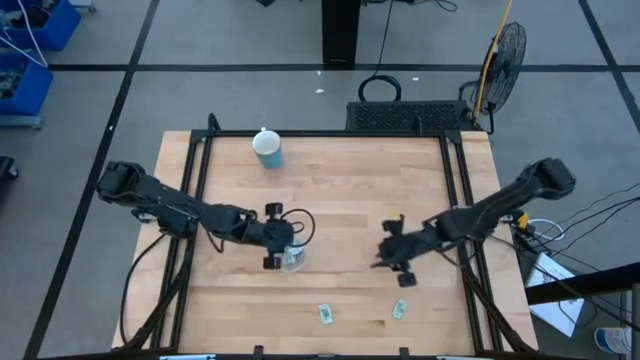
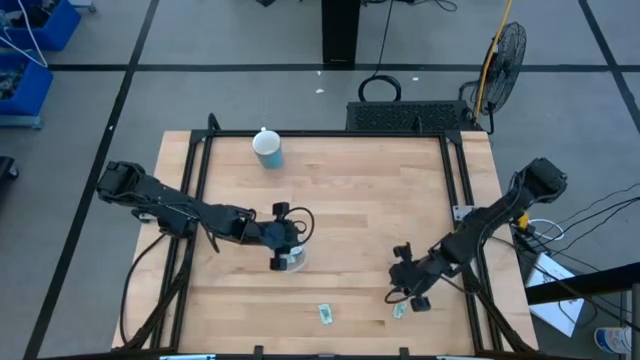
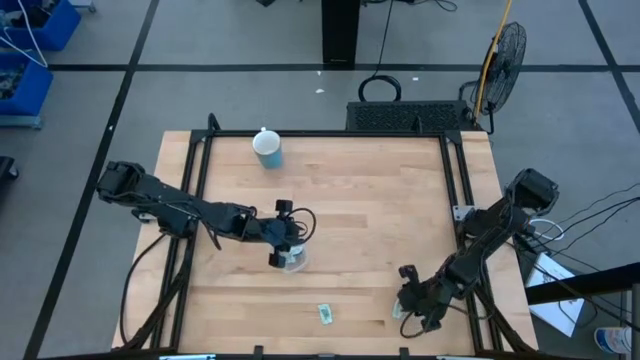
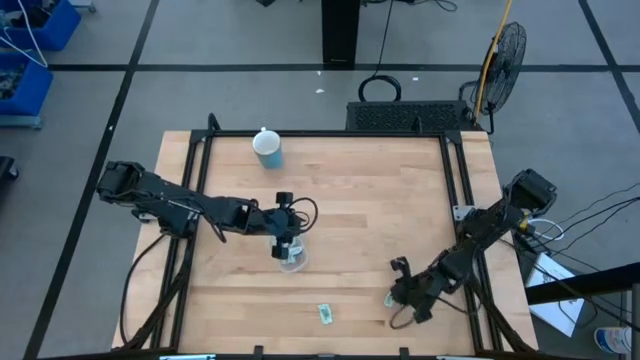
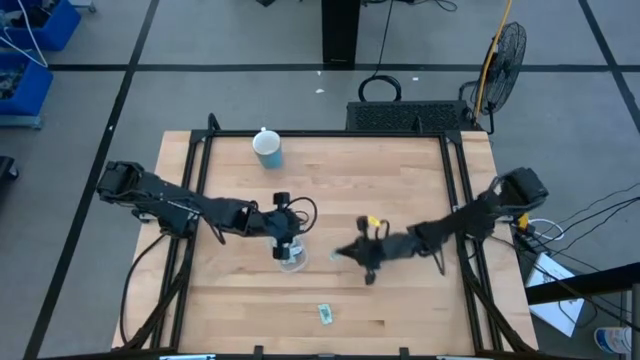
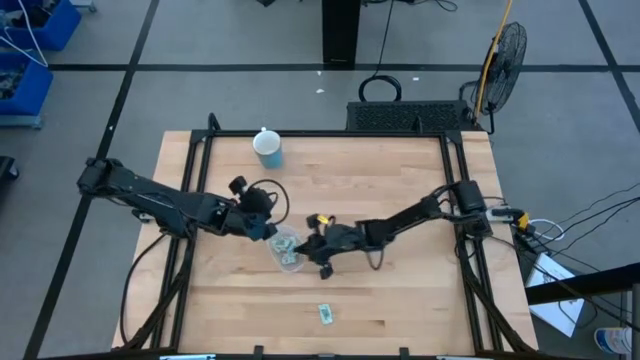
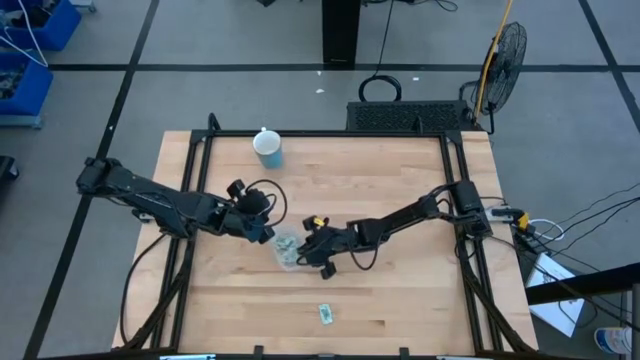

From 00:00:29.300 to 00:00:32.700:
Task: Pick and place Stevia / Truvia into bins
Put the stevia packet into the transparent container

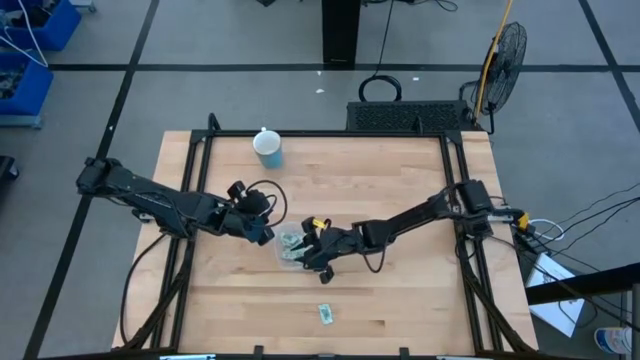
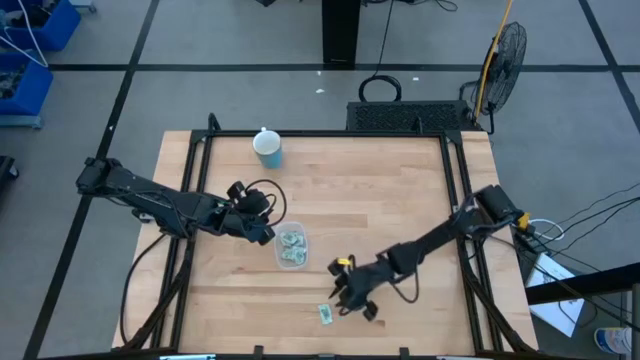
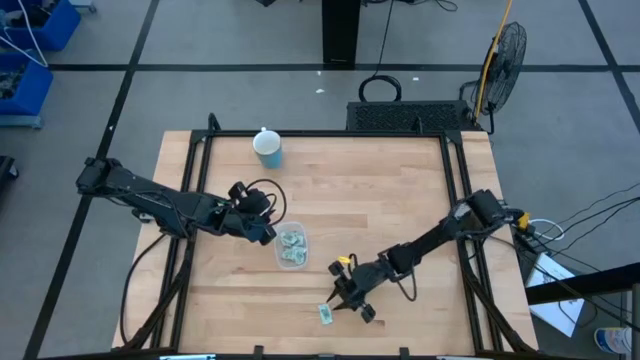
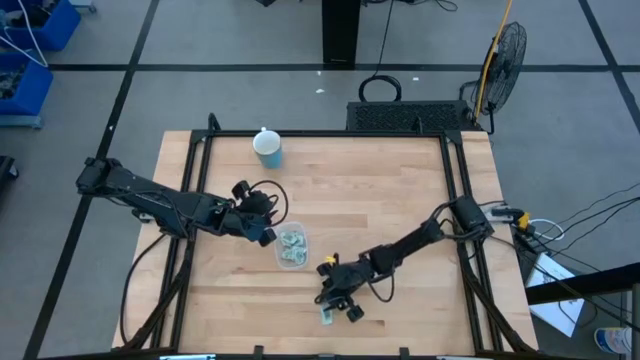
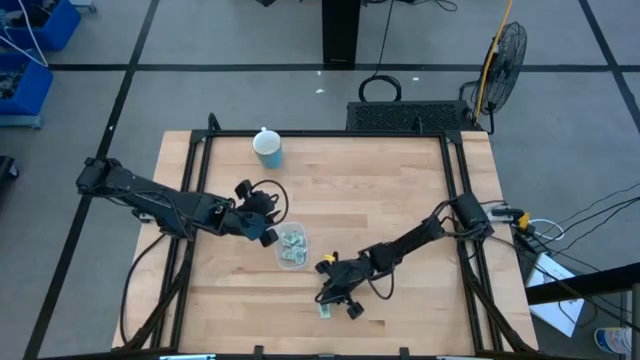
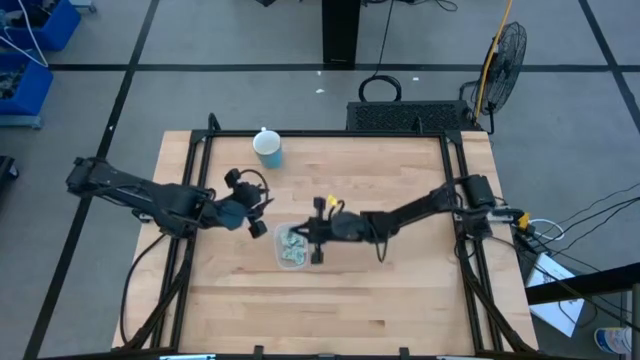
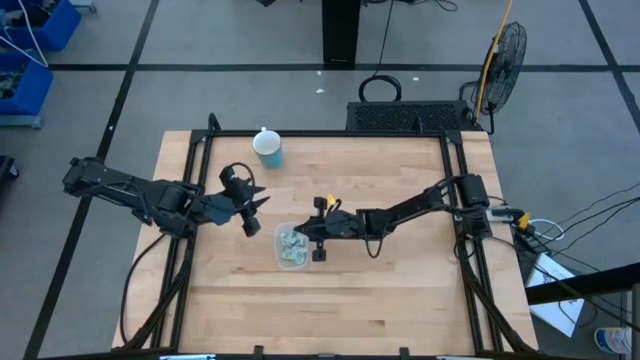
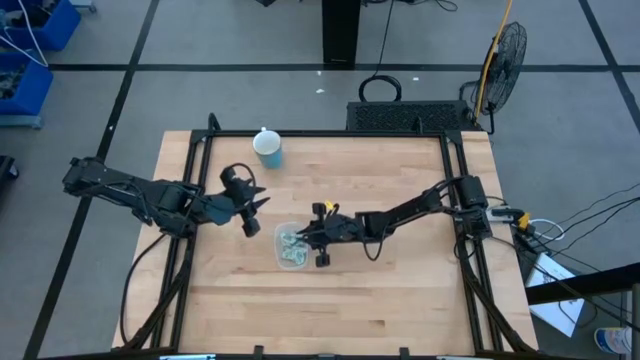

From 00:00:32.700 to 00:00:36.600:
Put the stevia packet into the transparent container

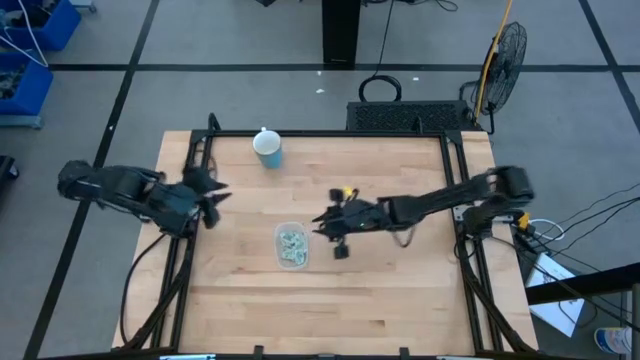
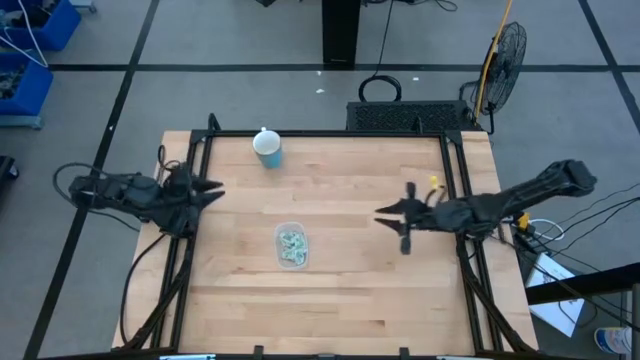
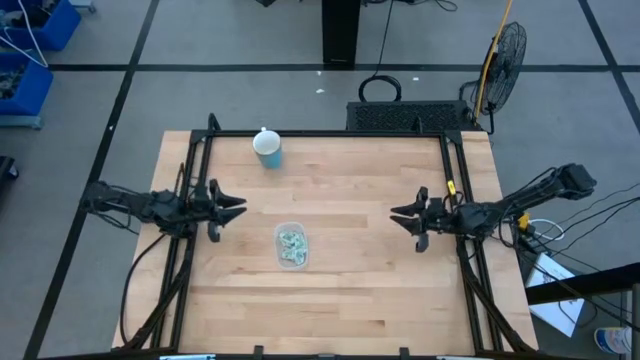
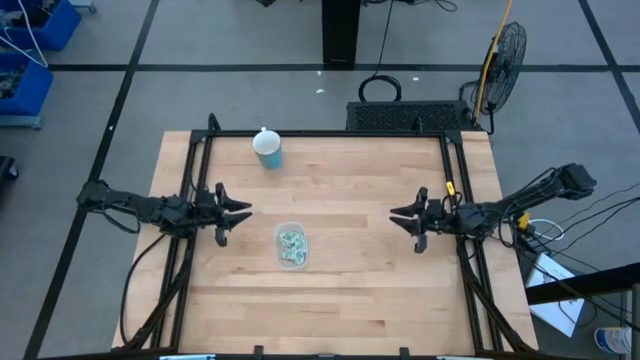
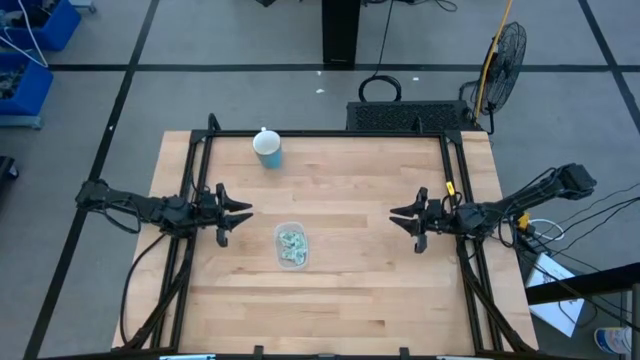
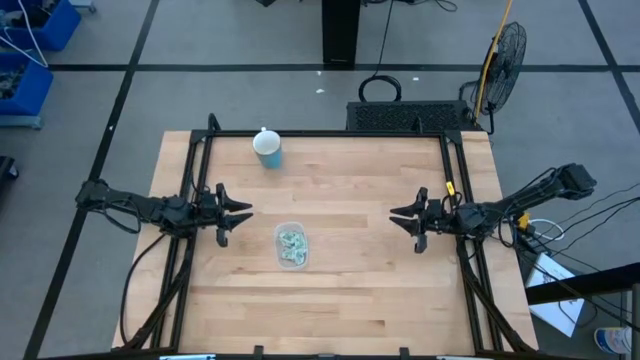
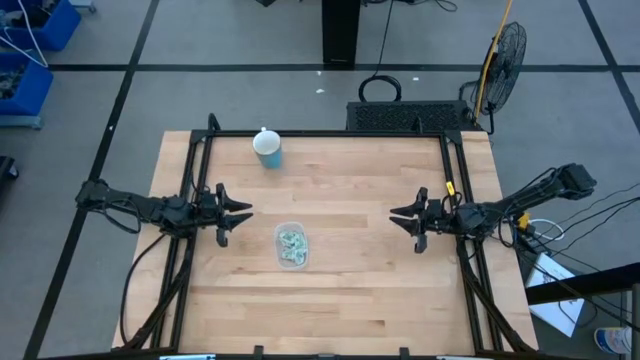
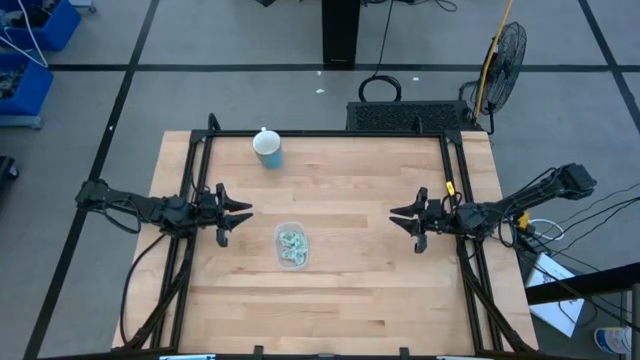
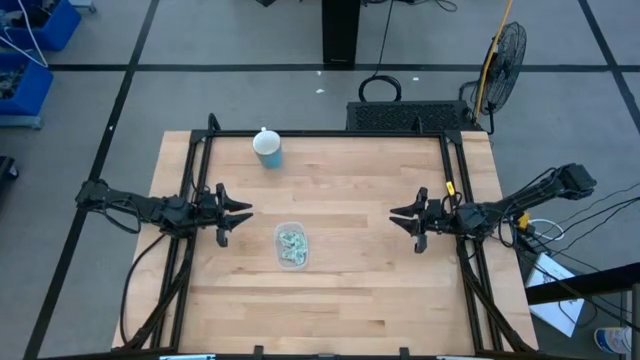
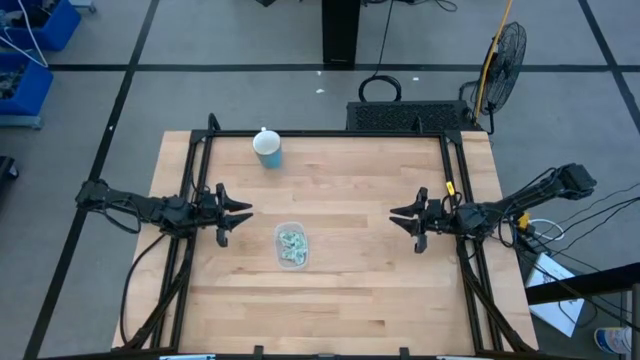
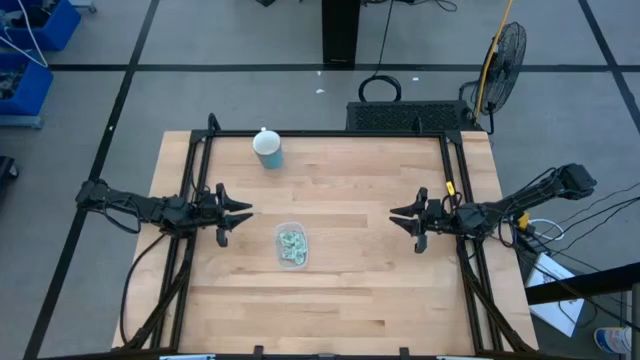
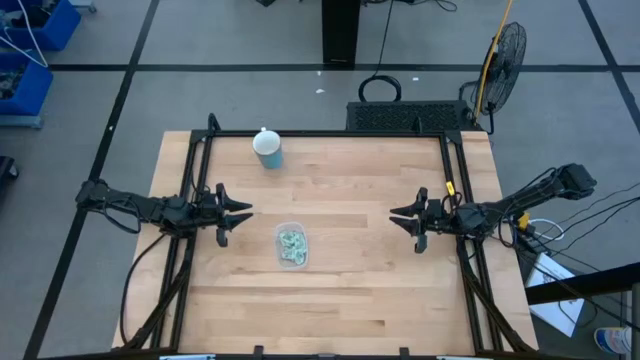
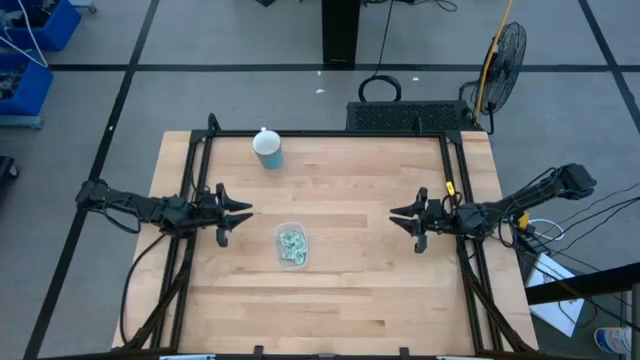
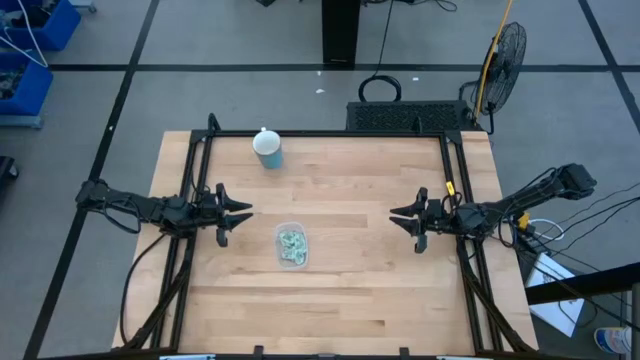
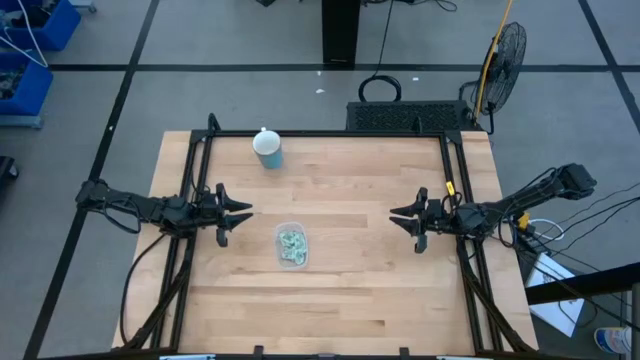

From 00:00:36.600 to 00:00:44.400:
Return to Home Position

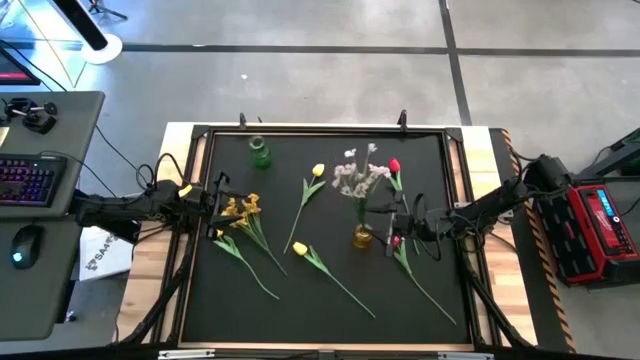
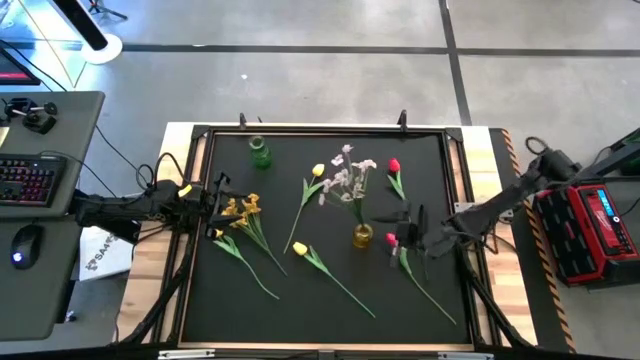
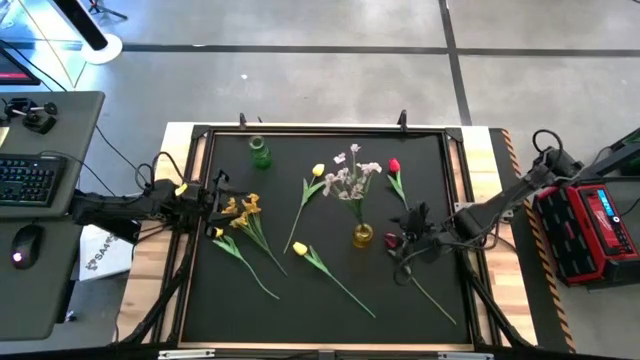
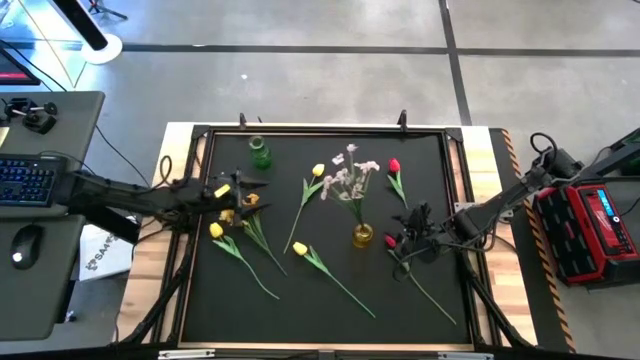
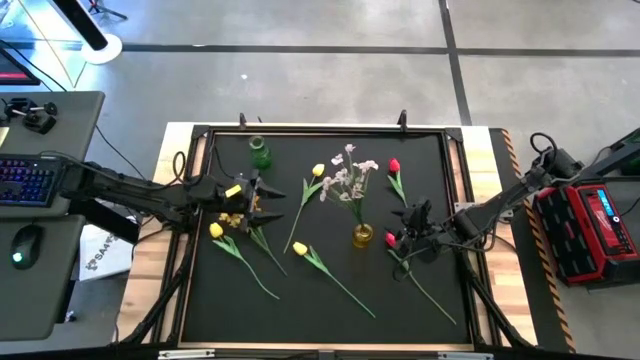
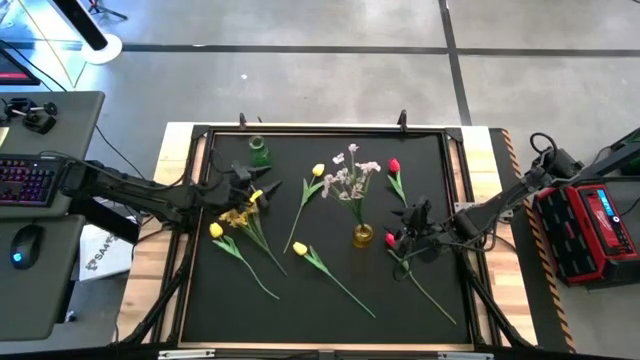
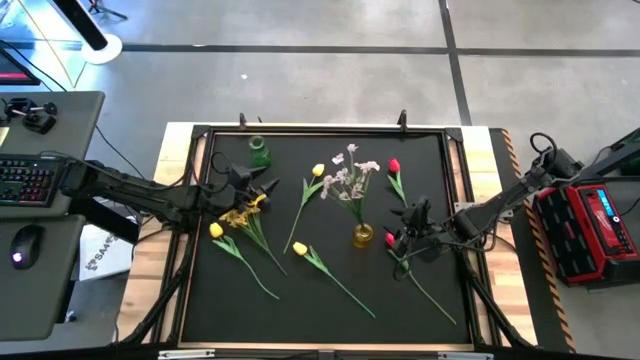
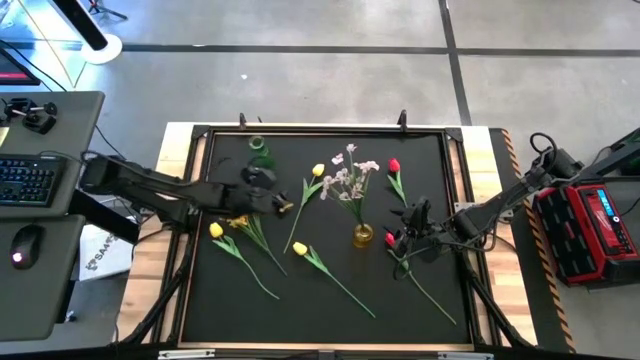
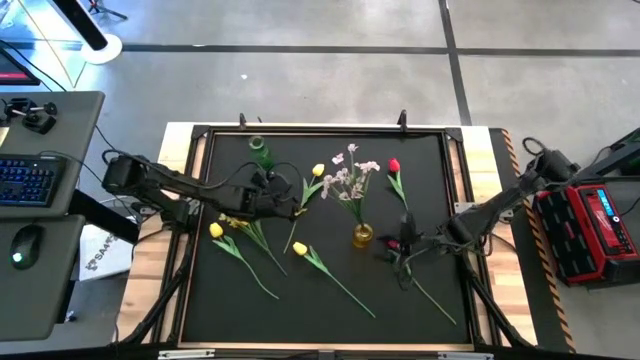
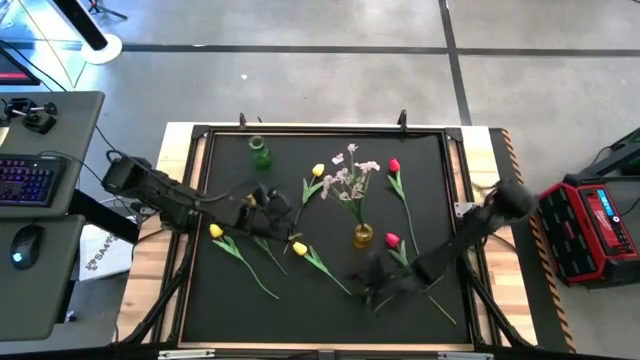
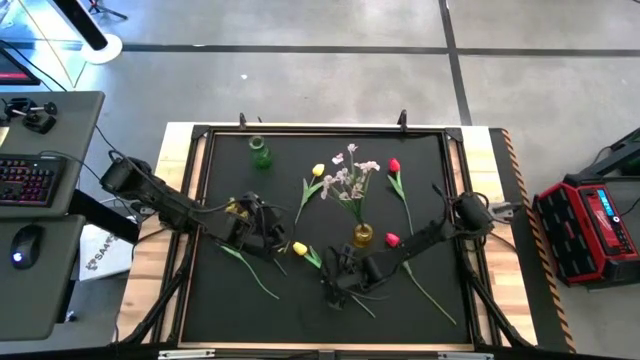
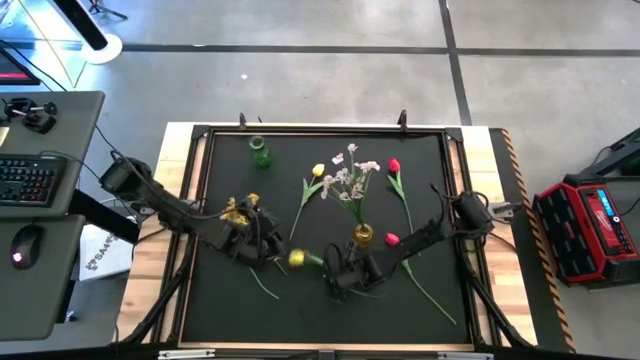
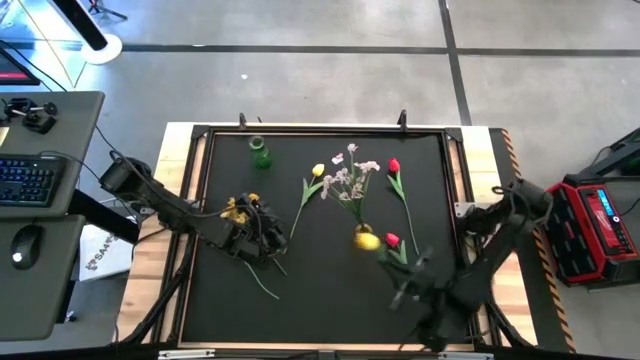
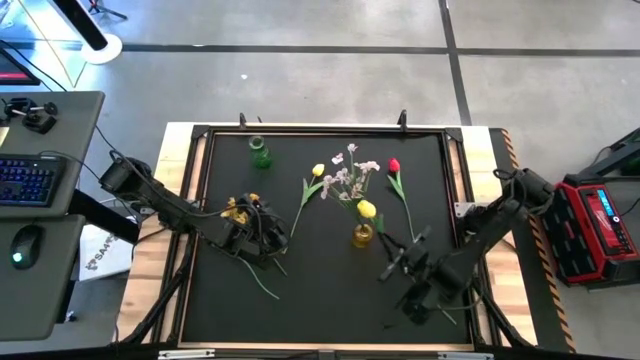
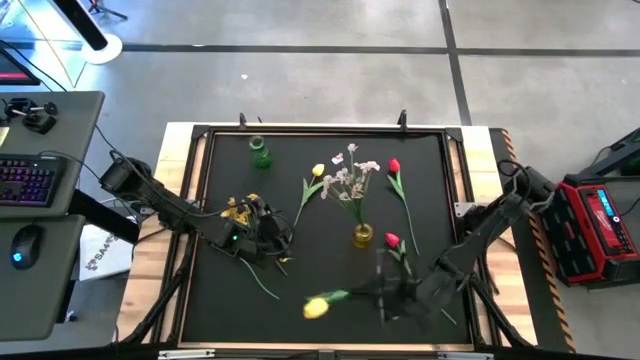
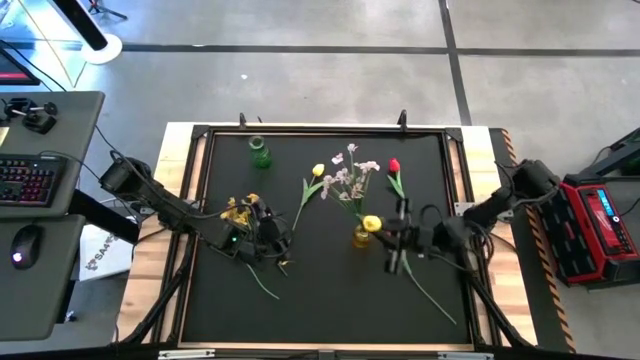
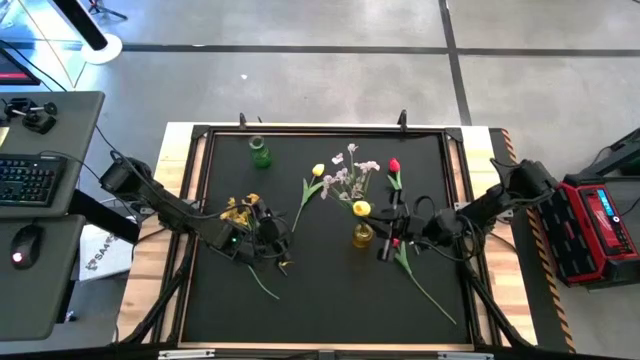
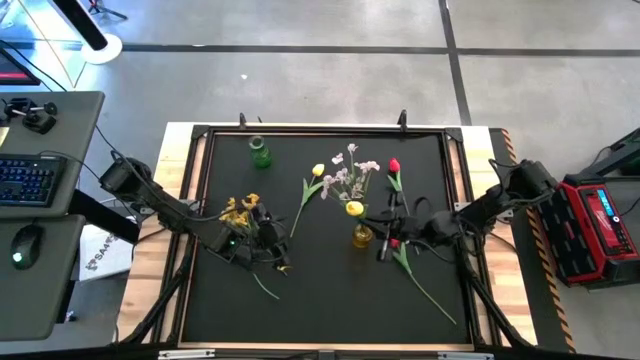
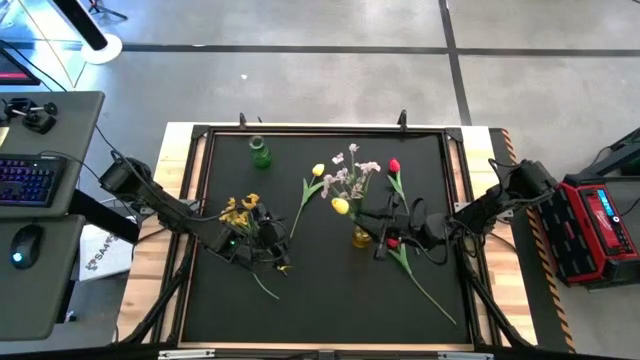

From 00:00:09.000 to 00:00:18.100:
Task: Sort flowers into vase by color
Put the bottom right yellow tulip into the yellow vase
